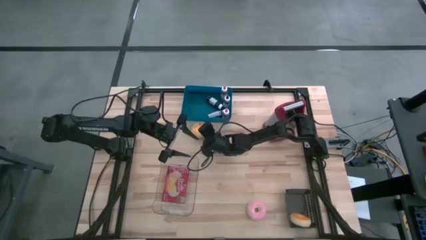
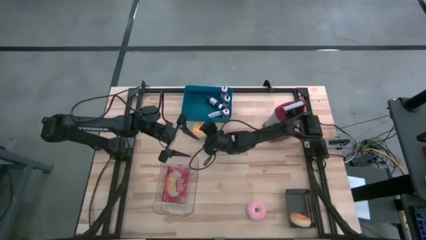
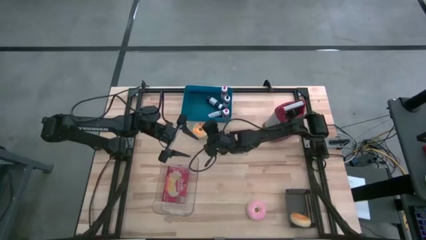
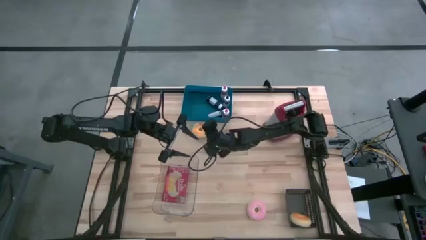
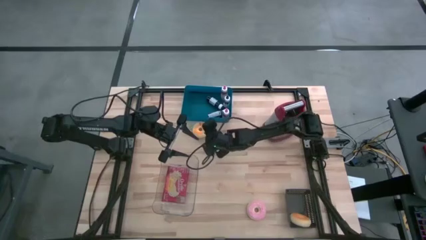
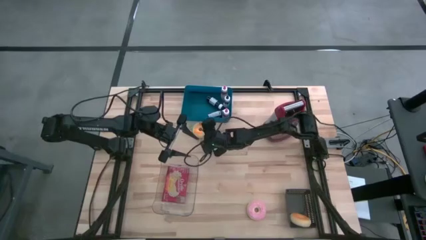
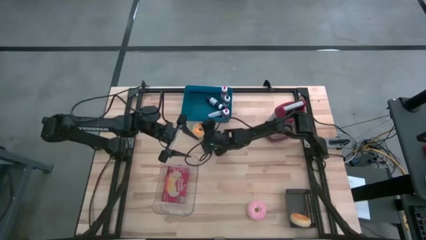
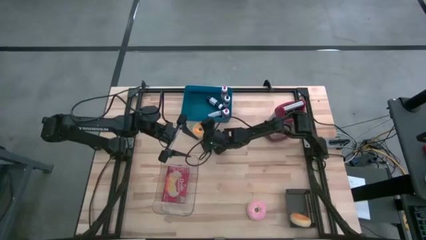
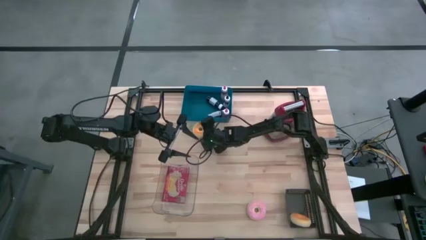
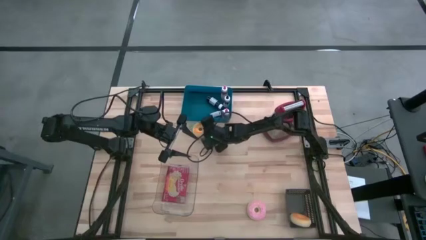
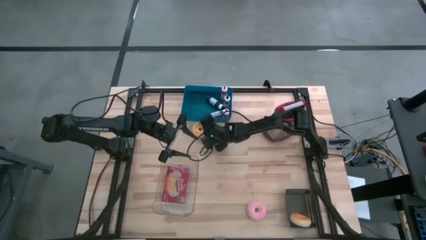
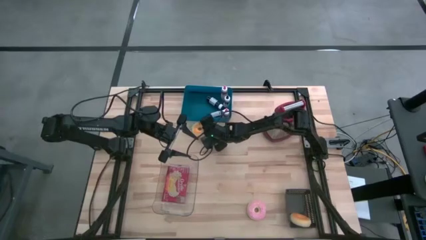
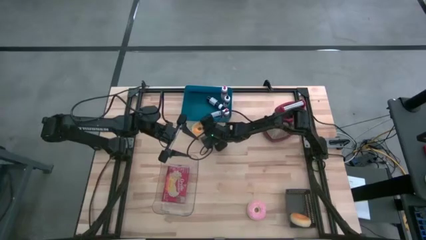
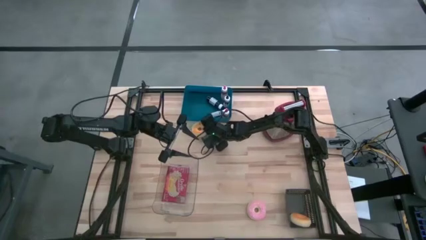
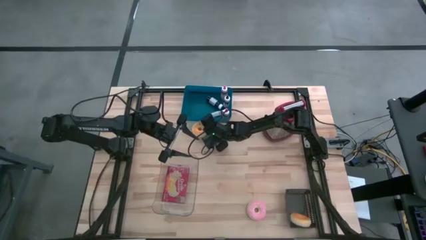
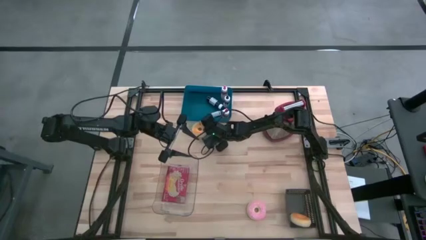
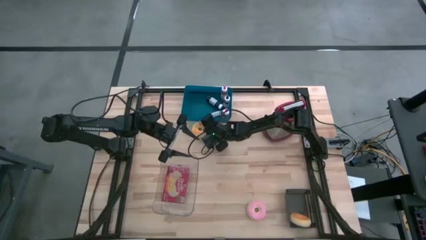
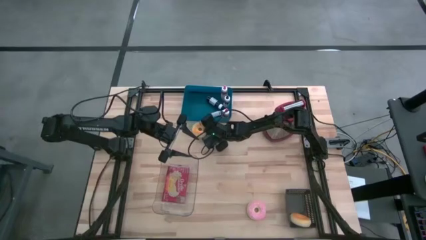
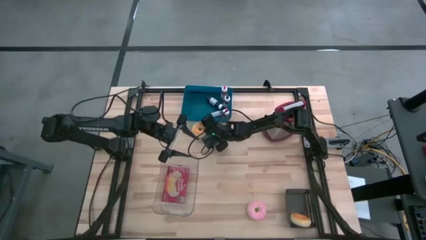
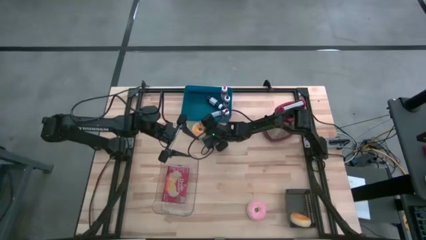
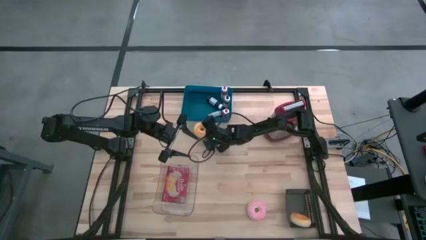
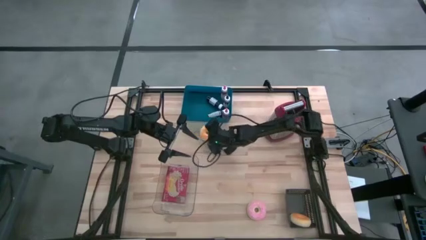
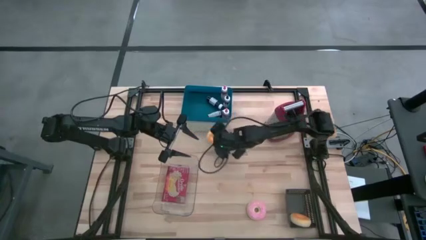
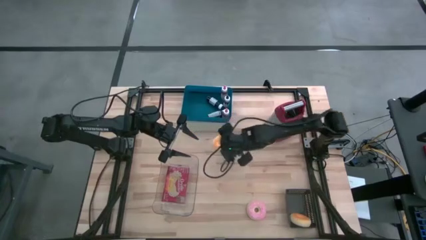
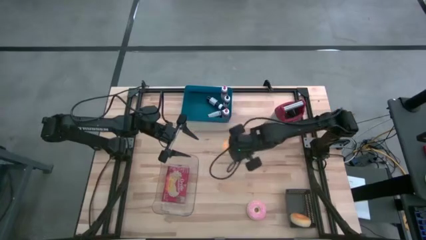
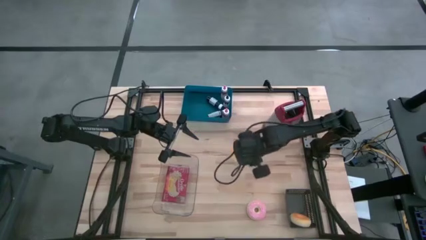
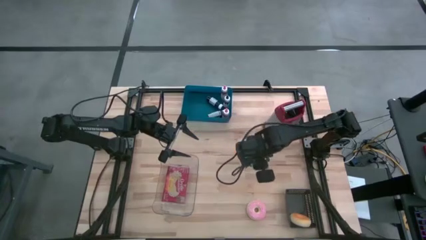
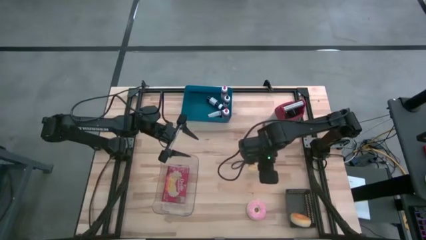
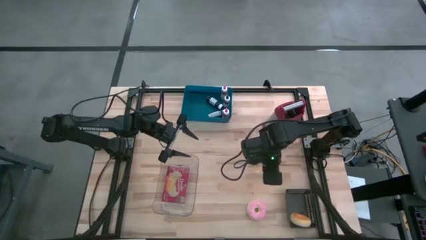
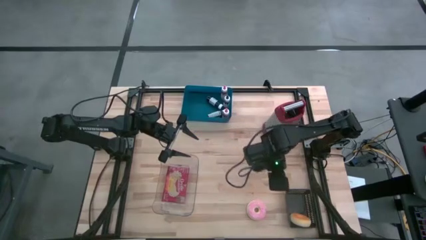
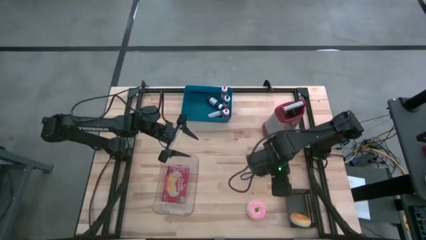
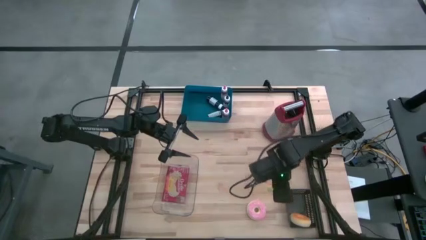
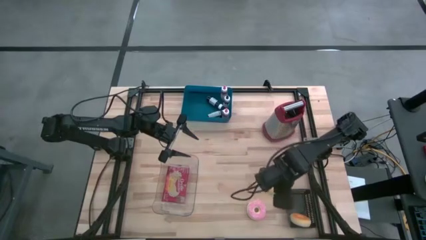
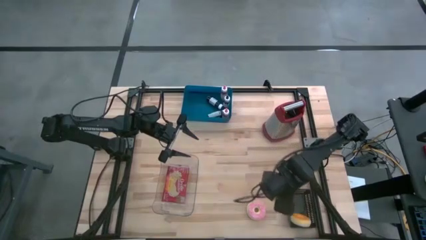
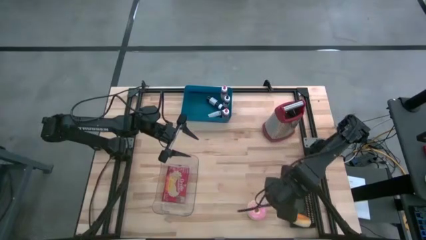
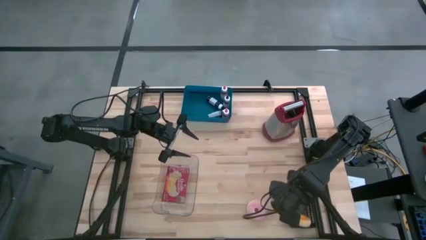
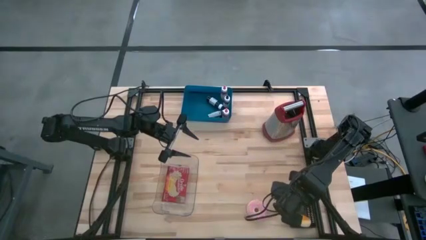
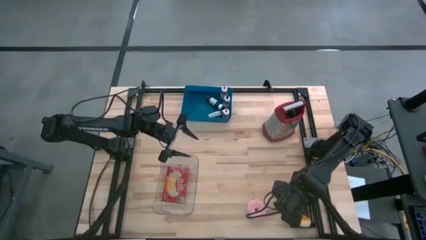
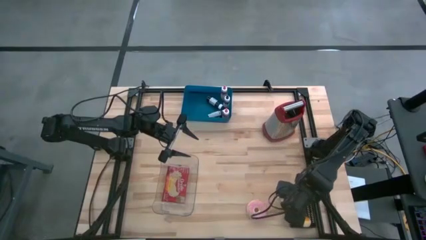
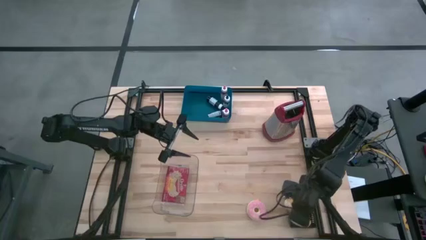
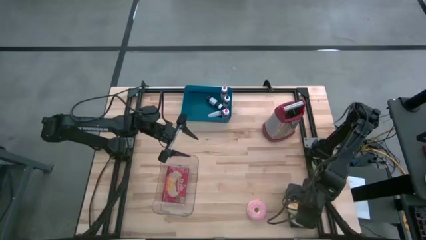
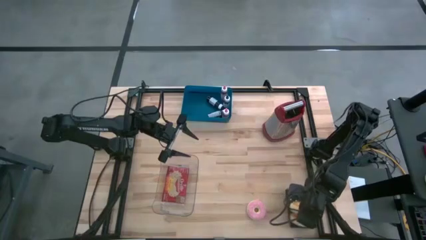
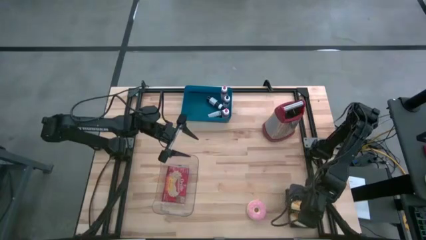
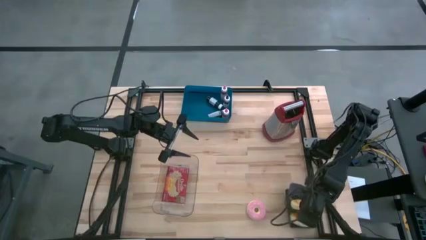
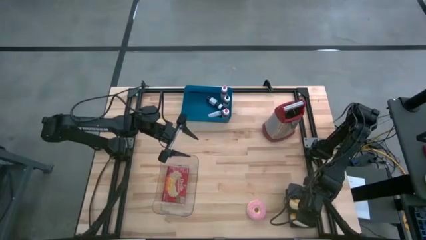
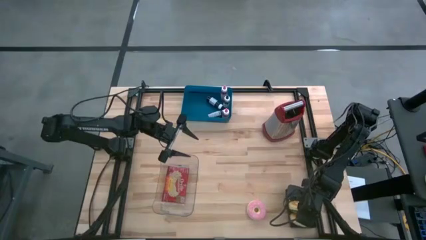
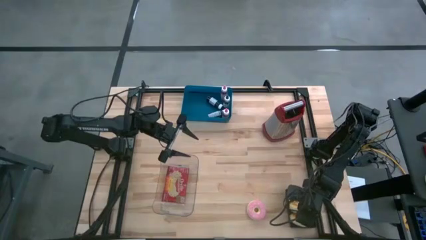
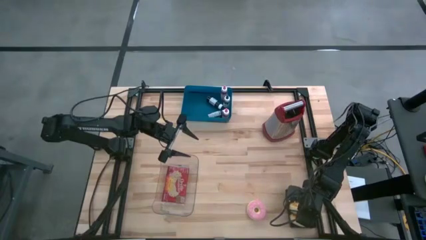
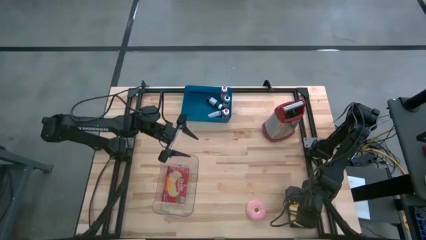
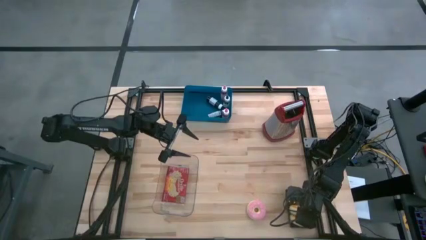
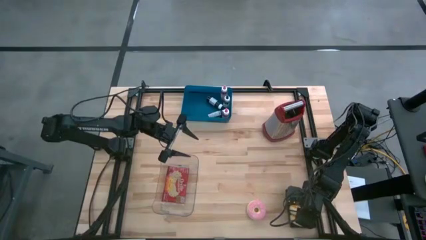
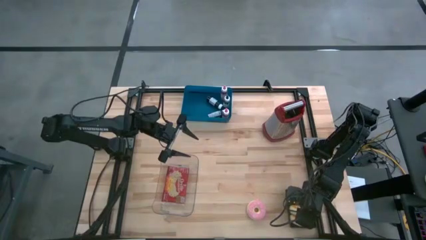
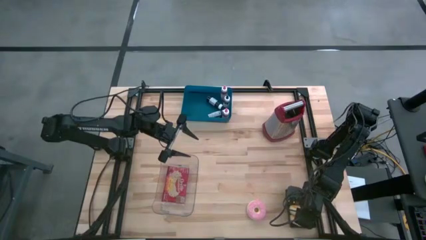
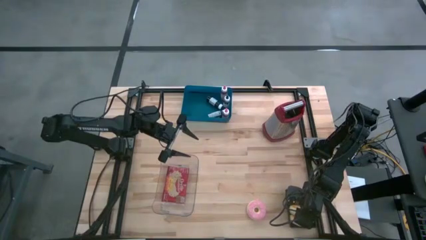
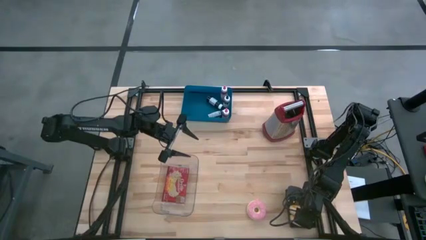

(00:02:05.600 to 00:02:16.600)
Task: Pick & Place Food Item
Put the yellow black doughnut into the black bin
